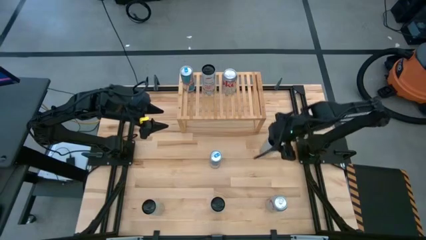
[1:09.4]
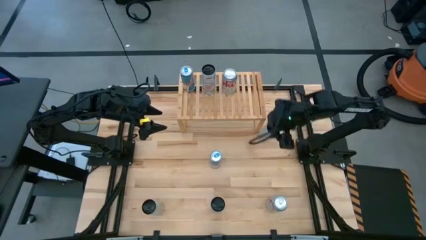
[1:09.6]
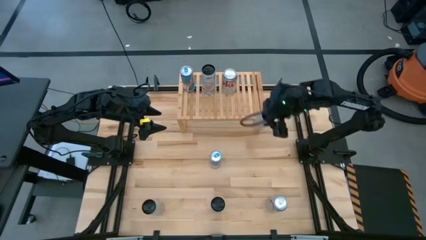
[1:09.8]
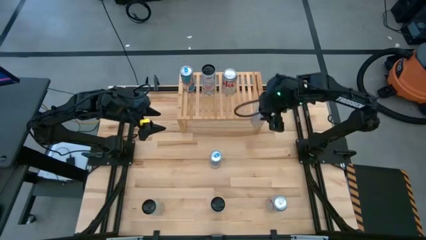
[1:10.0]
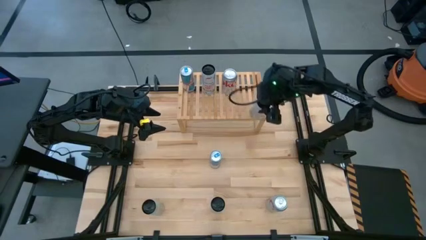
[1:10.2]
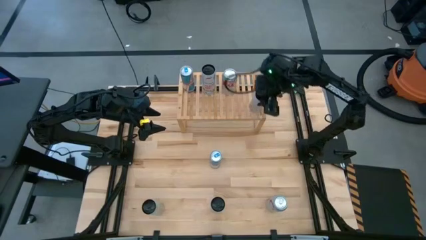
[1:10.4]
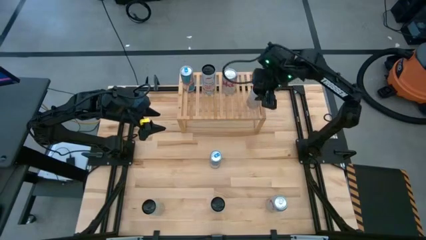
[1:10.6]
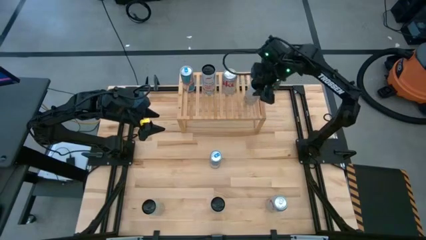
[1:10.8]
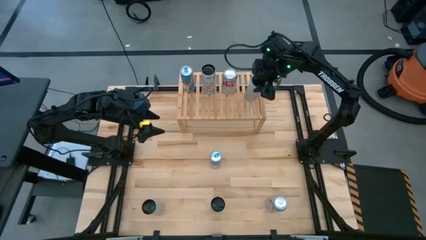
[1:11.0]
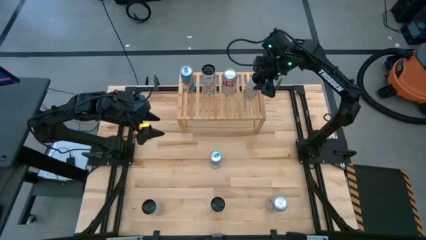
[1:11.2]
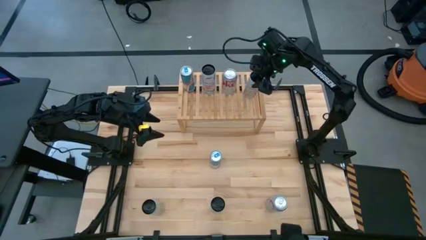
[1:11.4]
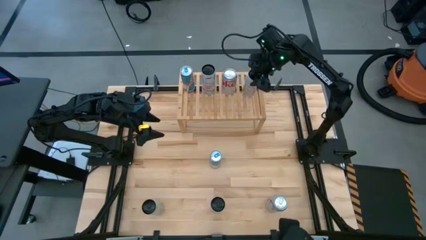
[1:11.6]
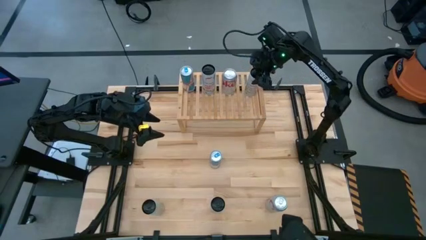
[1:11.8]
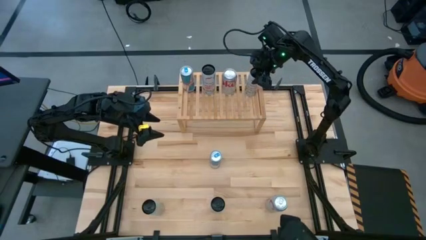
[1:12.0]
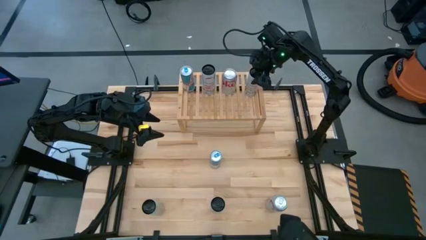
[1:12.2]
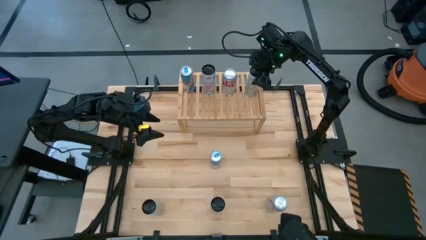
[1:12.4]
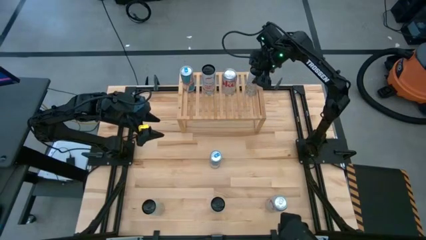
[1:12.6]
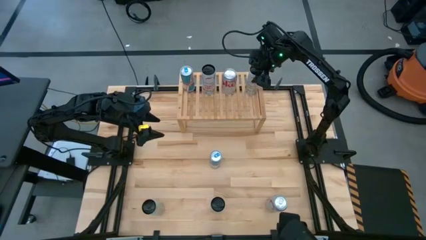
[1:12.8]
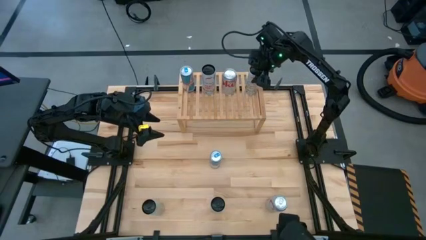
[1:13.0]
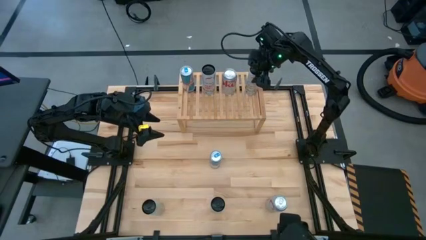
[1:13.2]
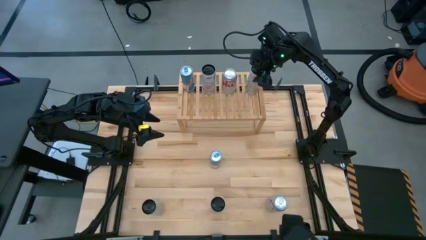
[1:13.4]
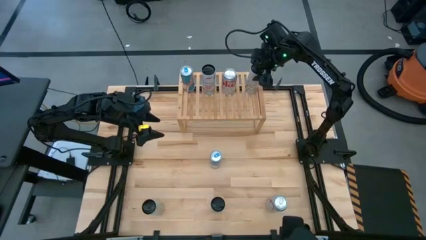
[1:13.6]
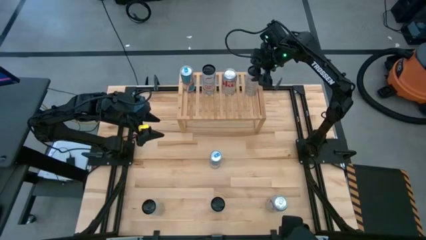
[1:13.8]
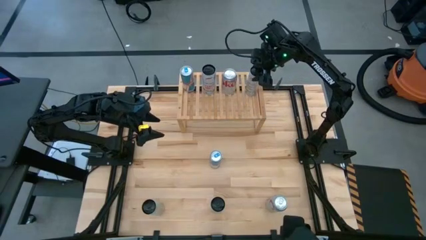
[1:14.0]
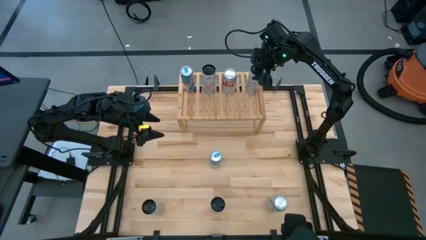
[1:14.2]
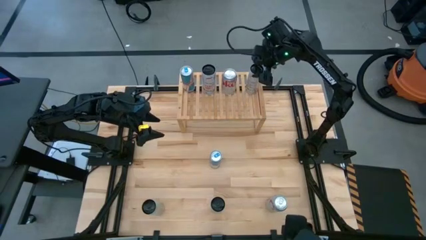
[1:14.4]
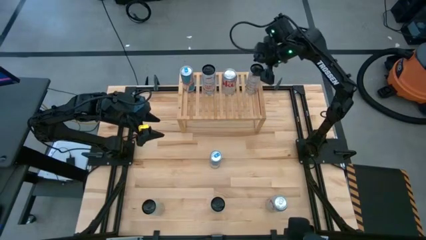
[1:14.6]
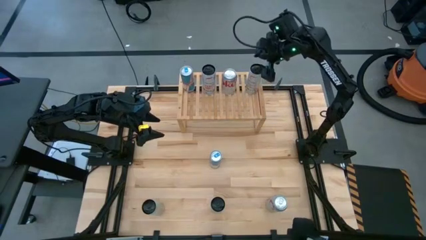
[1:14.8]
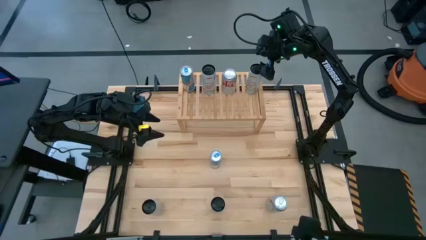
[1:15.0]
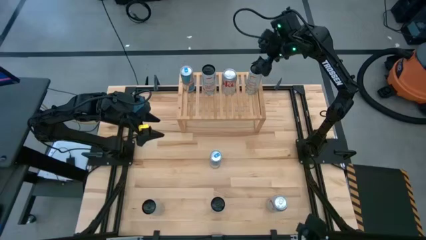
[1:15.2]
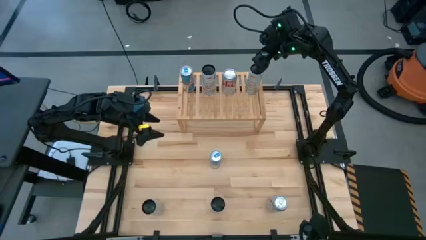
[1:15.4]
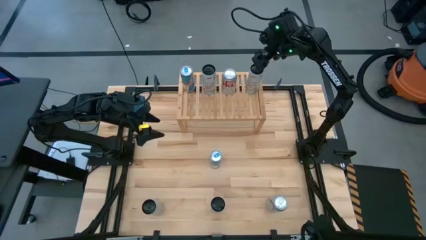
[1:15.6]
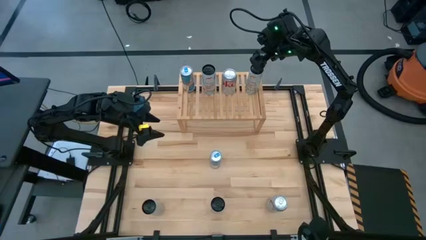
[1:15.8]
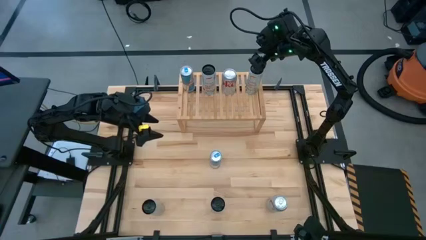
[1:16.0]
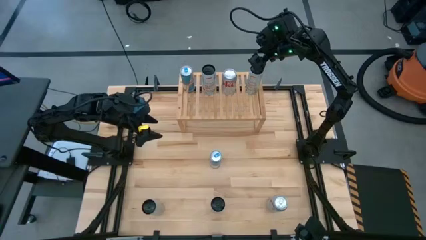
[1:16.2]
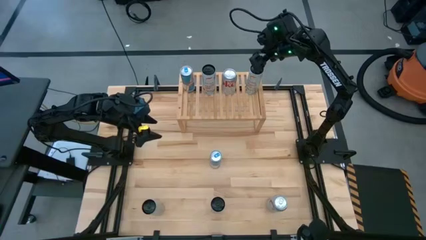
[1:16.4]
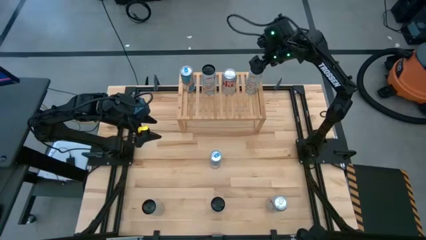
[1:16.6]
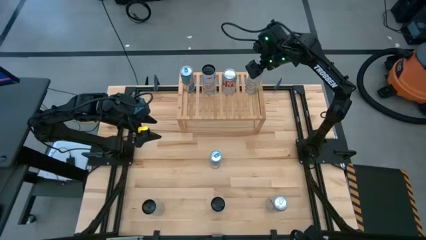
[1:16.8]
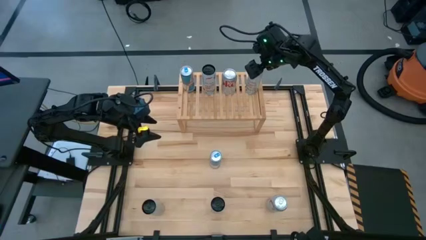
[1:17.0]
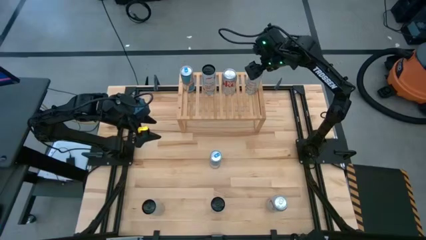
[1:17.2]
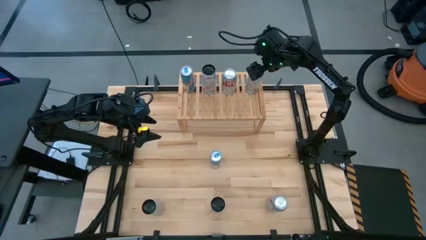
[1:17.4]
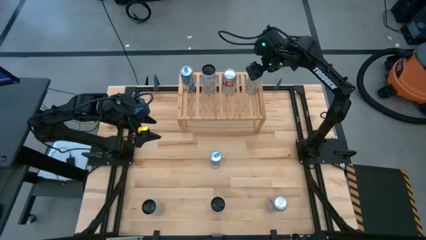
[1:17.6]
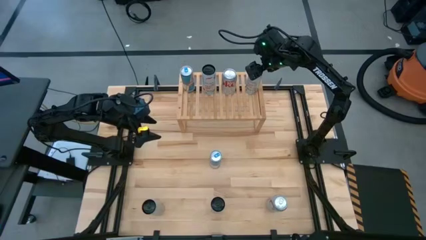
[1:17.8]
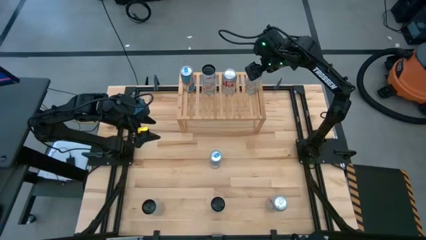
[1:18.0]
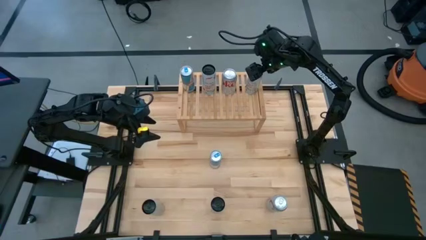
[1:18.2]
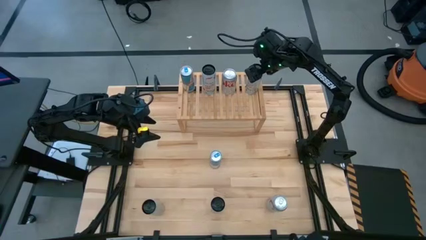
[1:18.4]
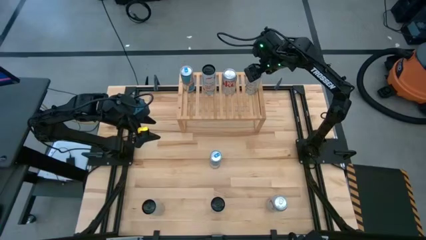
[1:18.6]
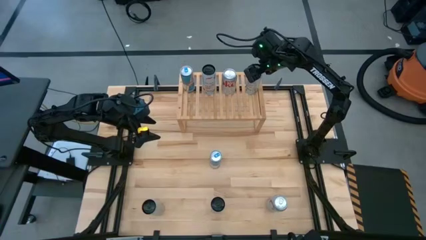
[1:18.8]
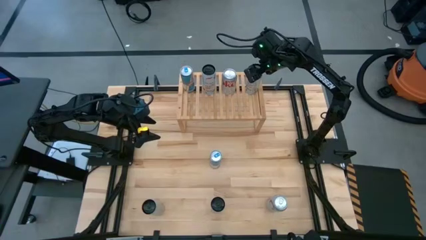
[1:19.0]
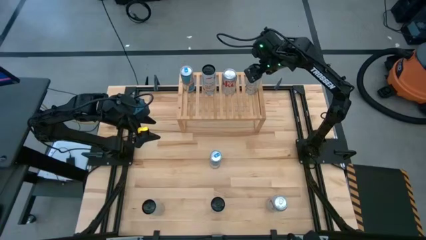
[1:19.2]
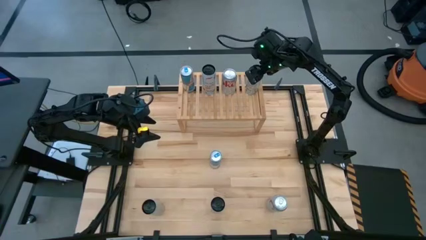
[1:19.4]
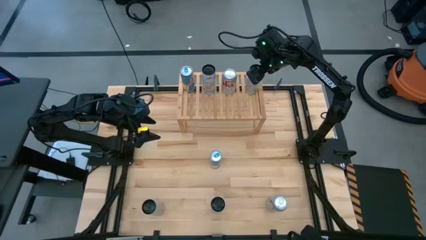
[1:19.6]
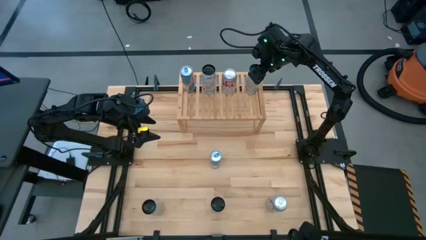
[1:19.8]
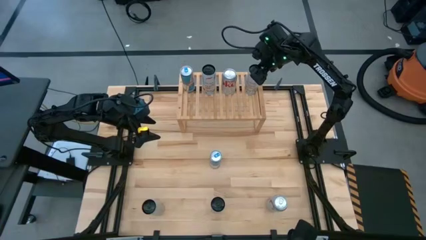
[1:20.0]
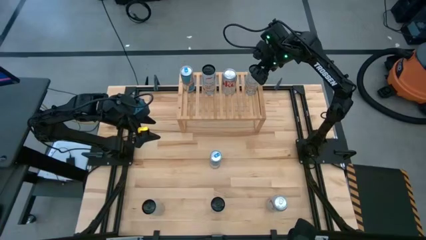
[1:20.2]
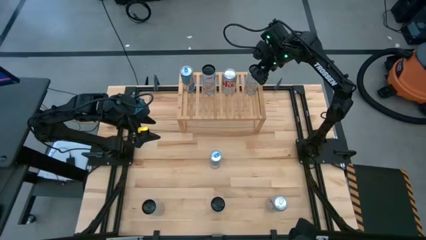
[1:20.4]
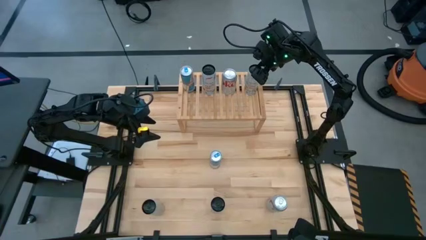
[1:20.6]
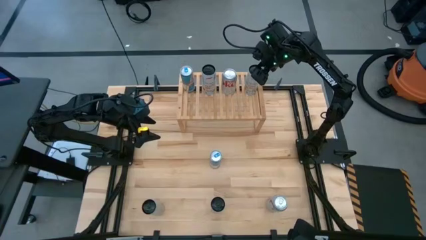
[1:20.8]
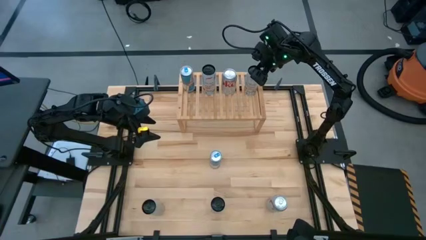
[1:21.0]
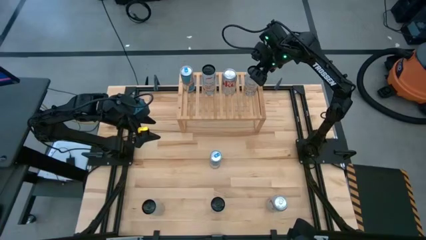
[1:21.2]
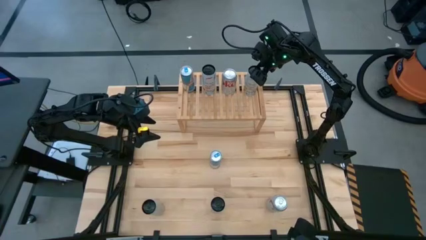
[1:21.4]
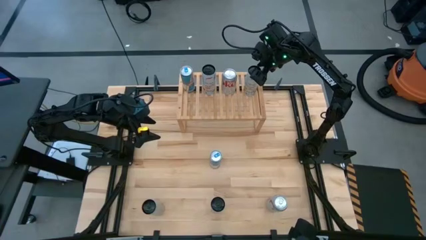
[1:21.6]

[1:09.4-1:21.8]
Task: Place canned beverage on shelf
Put the top white and yellow soda can on the shelf

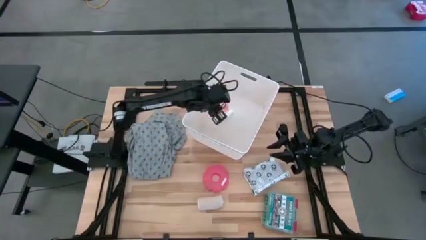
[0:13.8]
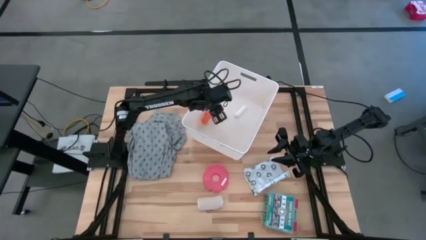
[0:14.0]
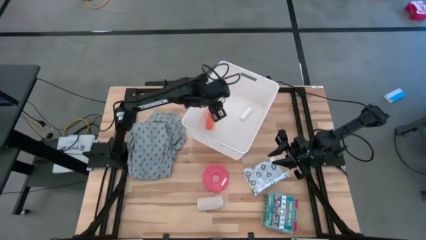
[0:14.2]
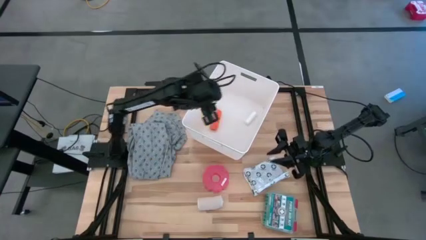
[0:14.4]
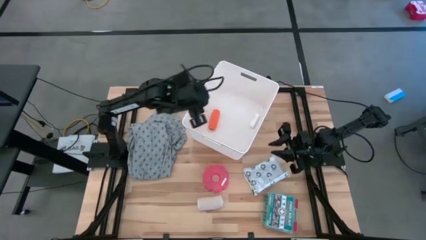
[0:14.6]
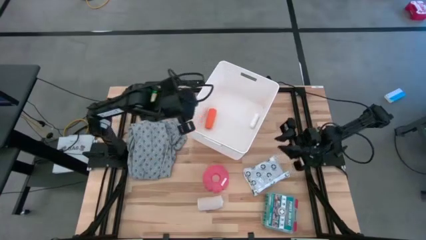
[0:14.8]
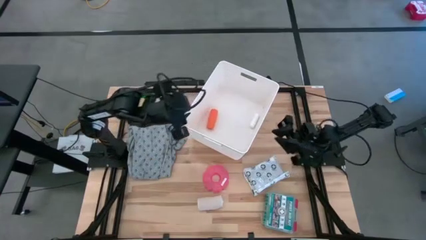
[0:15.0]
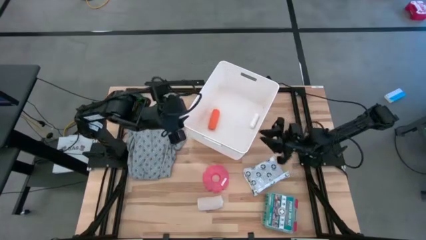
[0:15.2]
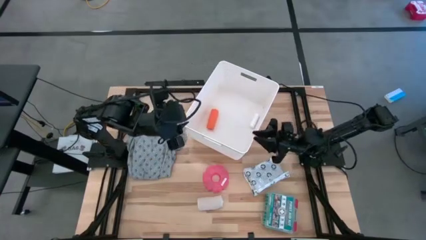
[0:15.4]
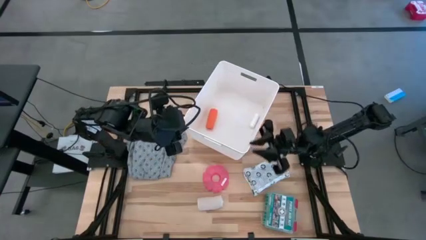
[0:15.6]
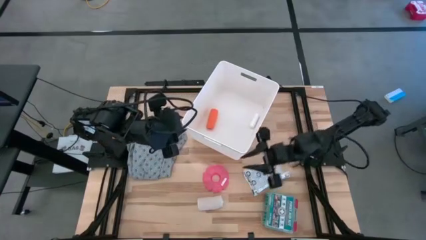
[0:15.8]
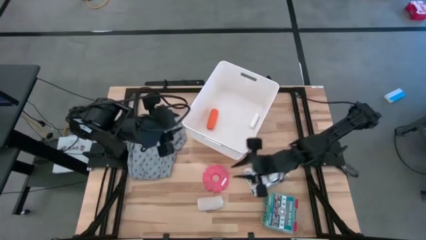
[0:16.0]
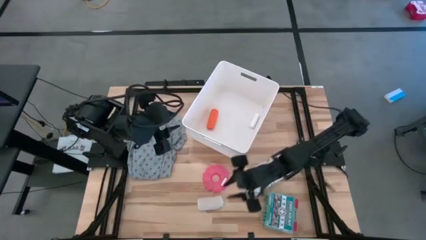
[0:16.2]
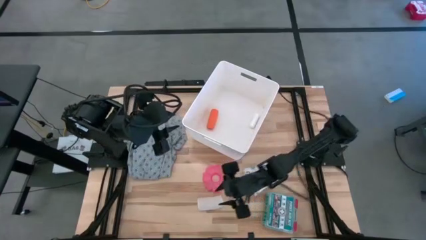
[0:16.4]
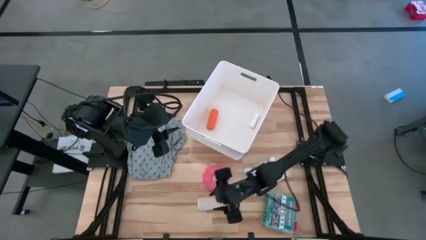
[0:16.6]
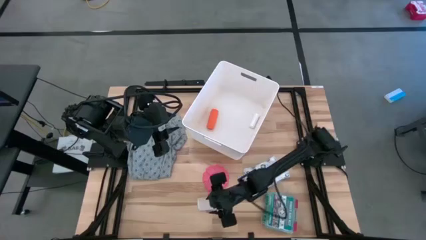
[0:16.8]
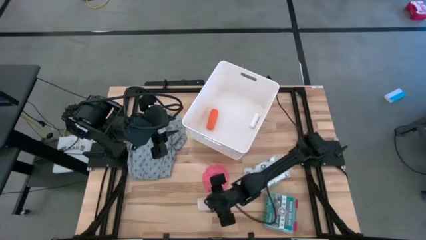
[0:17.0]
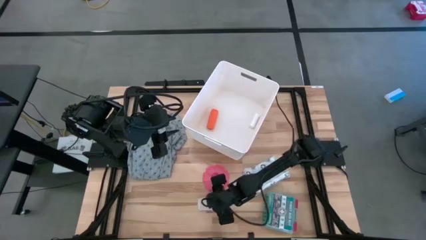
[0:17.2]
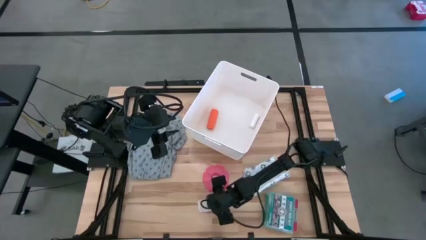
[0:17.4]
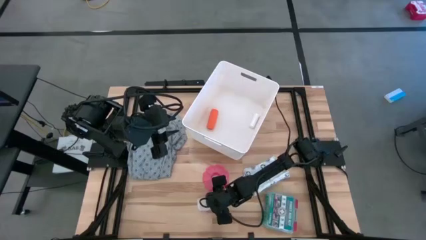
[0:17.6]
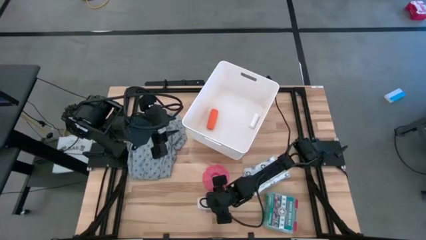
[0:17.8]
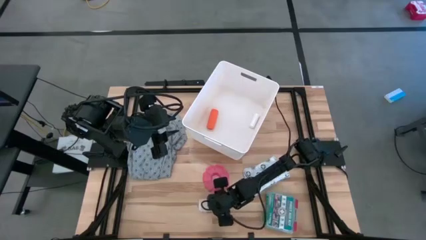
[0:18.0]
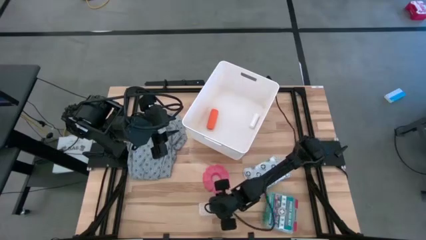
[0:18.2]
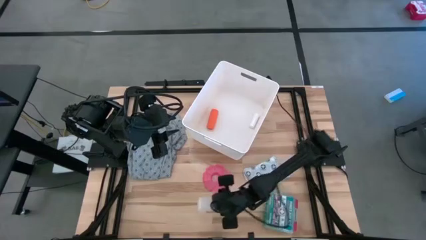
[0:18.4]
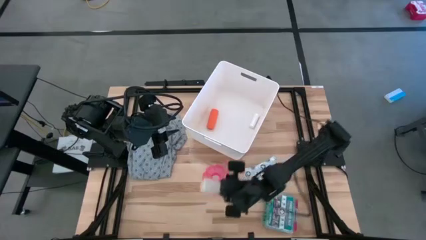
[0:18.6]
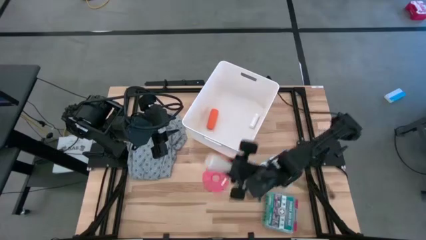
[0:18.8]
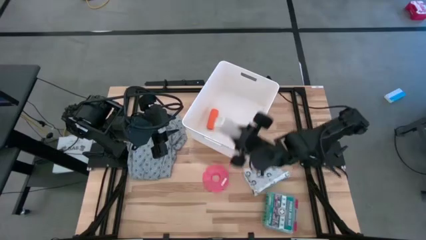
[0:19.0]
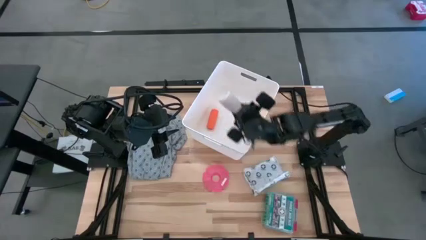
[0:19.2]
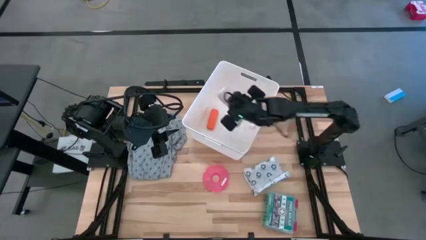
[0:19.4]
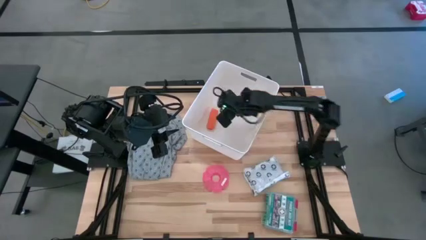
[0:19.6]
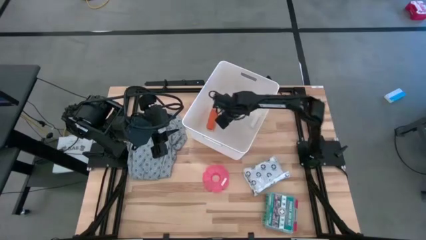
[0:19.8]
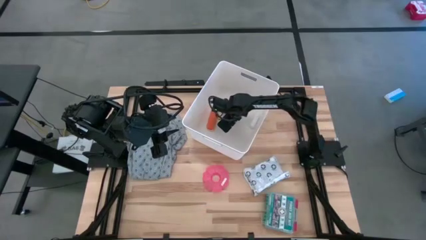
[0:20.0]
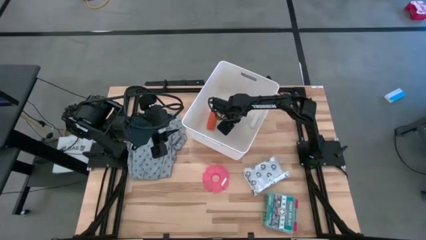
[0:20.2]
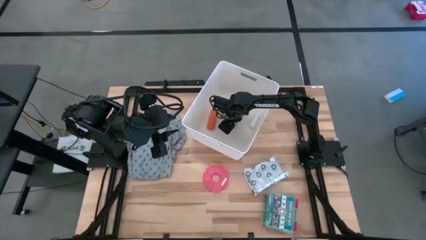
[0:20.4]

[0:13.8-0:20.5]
Task: Pick & place medical supplies in basket/bin
Put the white bandage into the white bin
